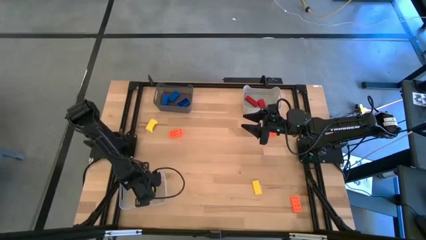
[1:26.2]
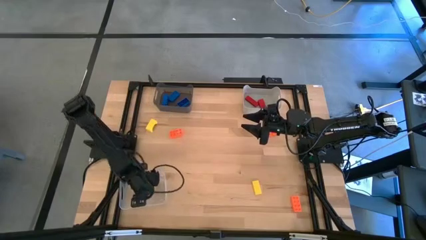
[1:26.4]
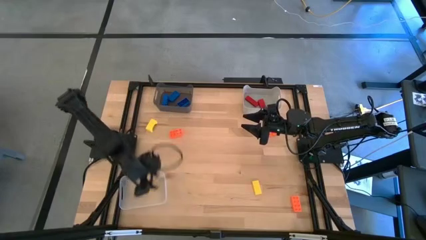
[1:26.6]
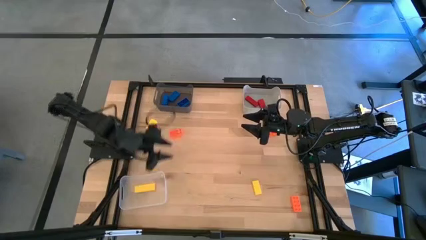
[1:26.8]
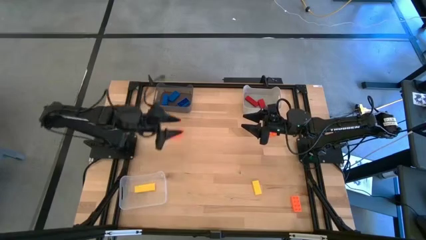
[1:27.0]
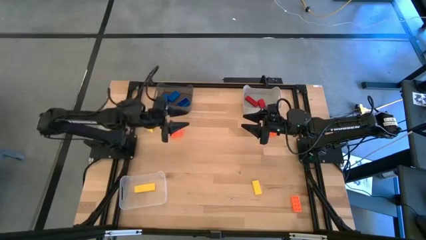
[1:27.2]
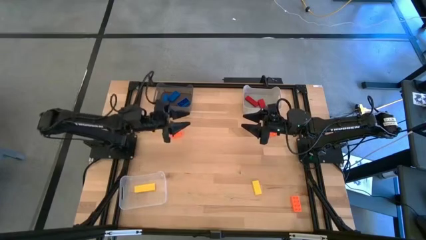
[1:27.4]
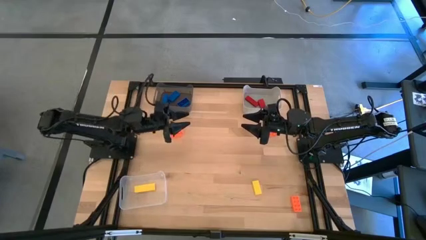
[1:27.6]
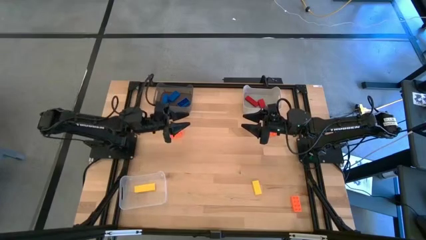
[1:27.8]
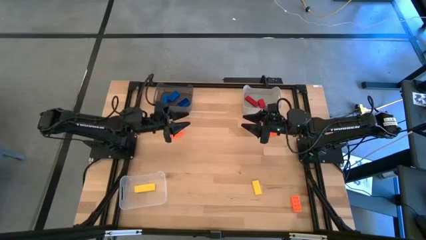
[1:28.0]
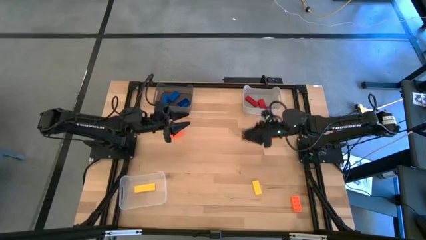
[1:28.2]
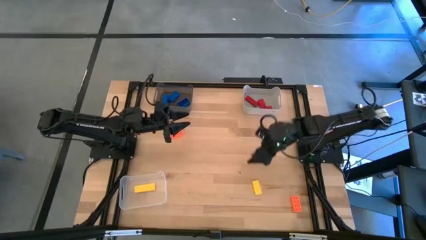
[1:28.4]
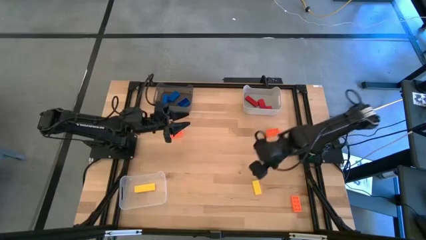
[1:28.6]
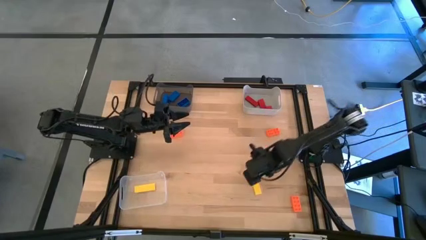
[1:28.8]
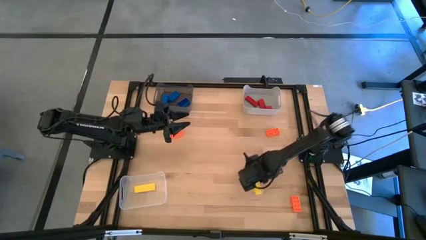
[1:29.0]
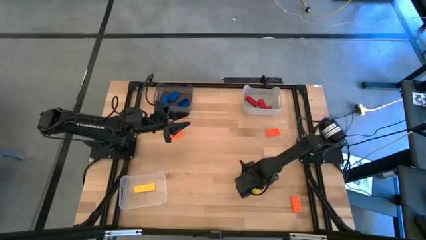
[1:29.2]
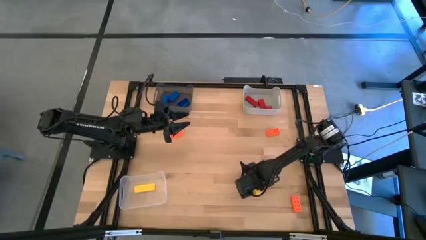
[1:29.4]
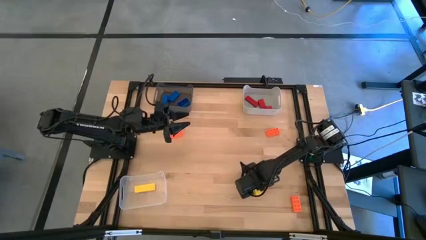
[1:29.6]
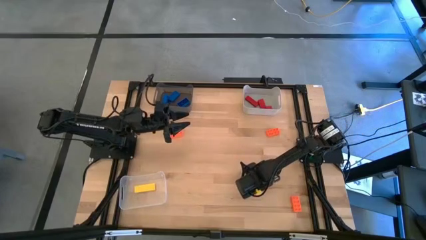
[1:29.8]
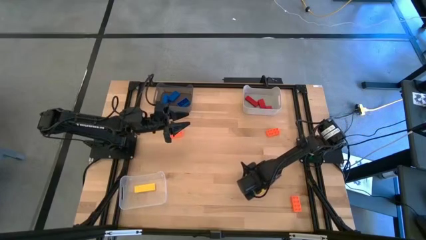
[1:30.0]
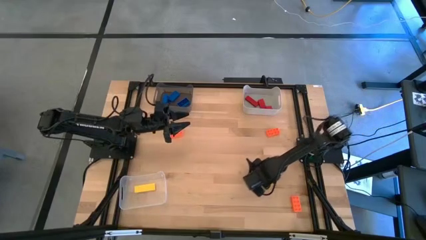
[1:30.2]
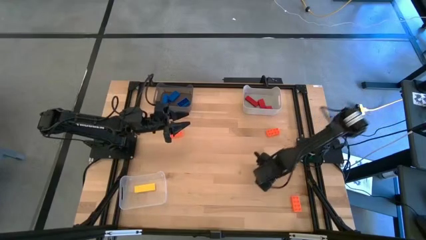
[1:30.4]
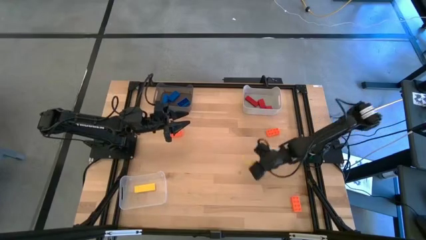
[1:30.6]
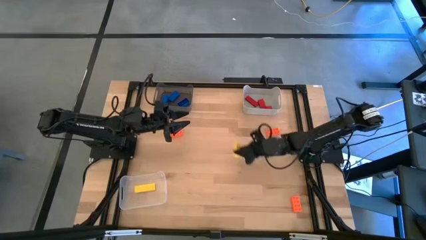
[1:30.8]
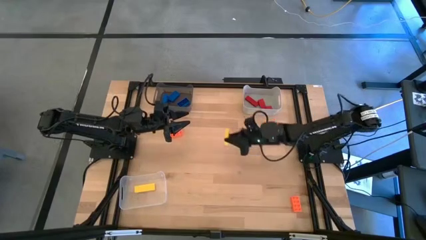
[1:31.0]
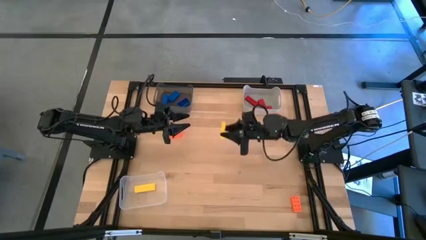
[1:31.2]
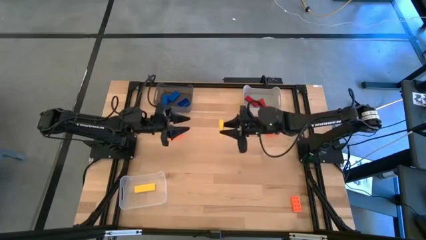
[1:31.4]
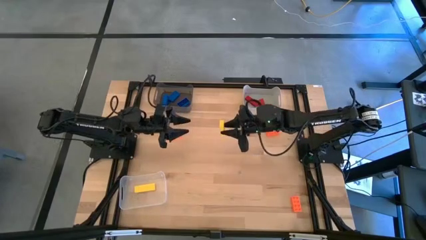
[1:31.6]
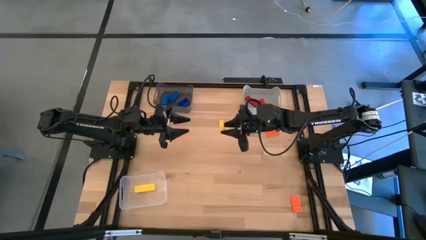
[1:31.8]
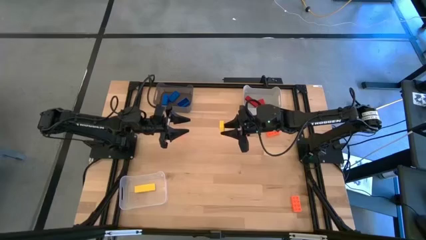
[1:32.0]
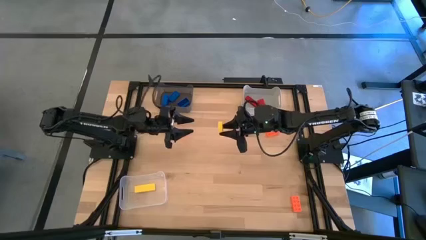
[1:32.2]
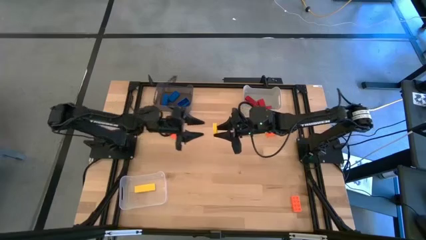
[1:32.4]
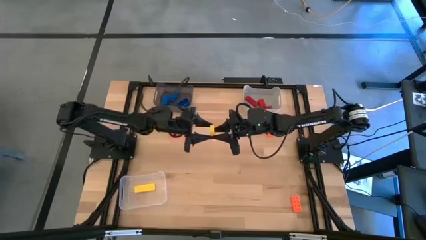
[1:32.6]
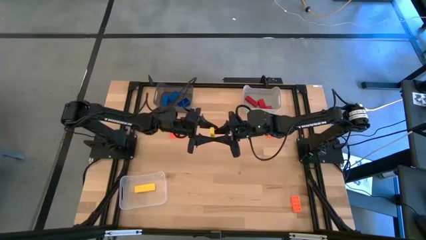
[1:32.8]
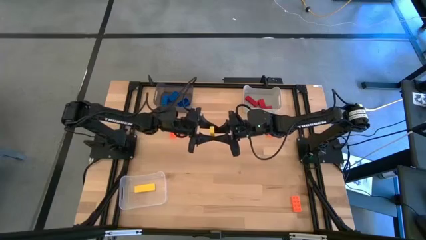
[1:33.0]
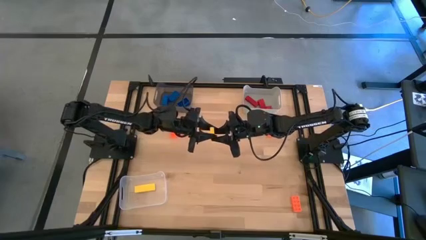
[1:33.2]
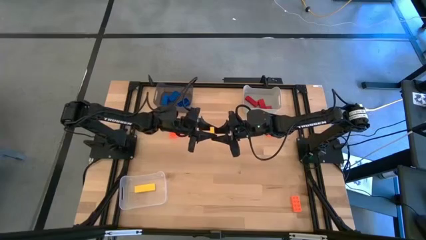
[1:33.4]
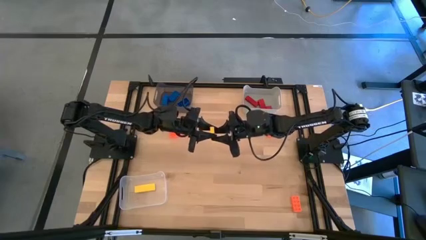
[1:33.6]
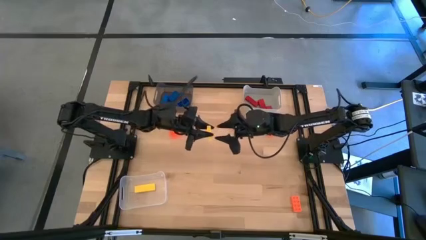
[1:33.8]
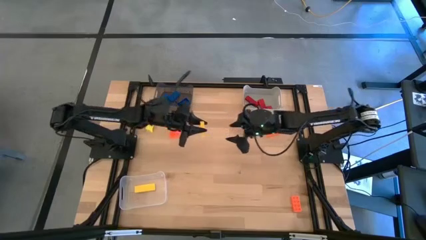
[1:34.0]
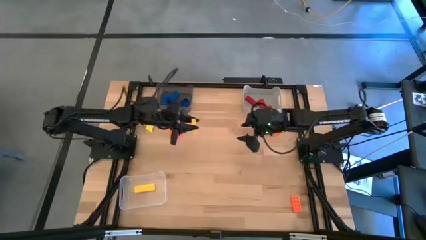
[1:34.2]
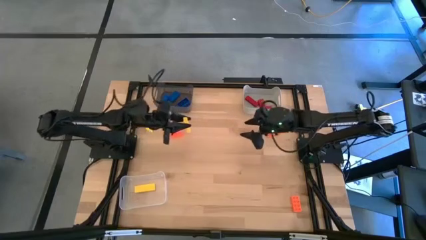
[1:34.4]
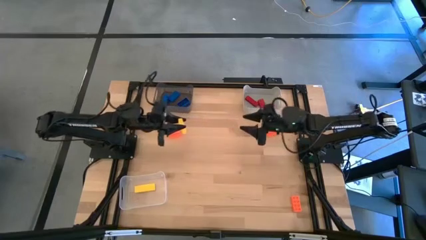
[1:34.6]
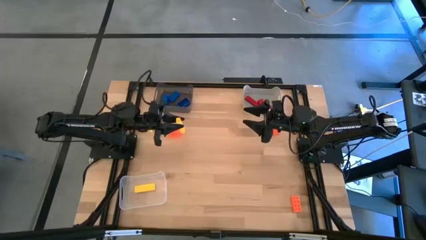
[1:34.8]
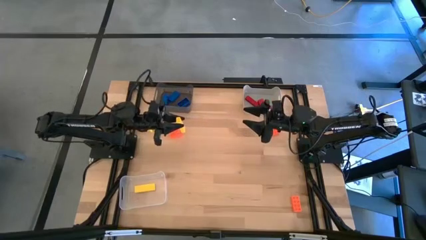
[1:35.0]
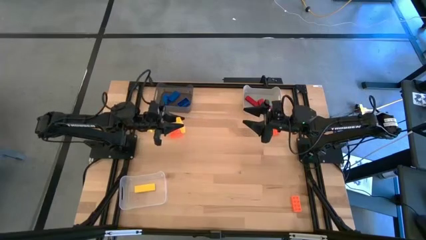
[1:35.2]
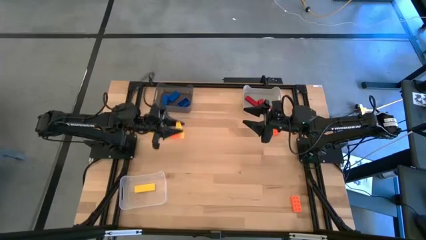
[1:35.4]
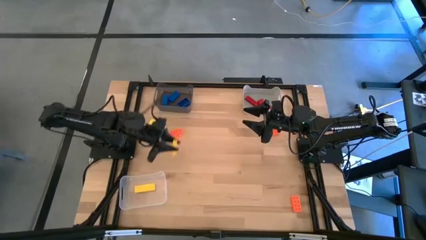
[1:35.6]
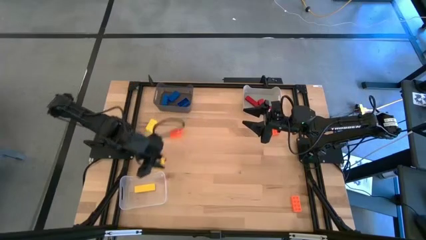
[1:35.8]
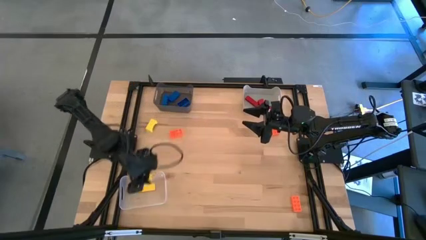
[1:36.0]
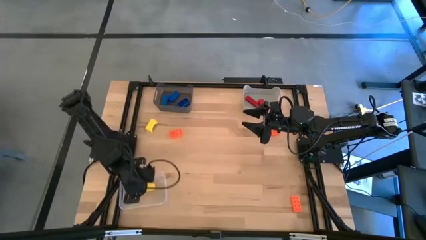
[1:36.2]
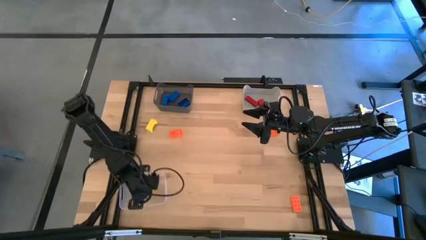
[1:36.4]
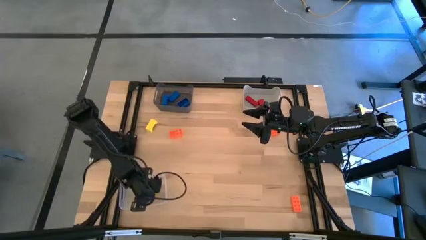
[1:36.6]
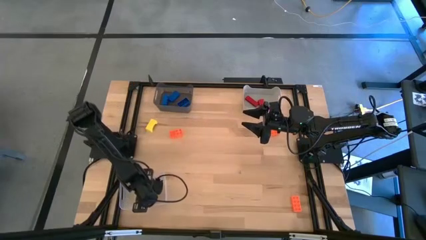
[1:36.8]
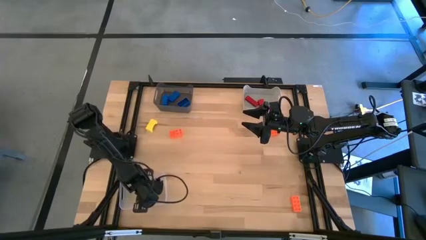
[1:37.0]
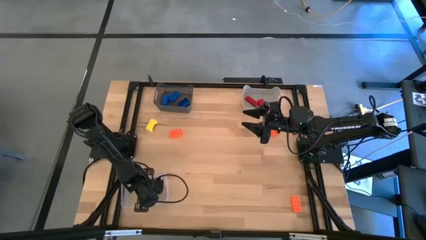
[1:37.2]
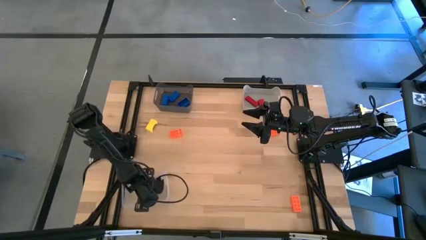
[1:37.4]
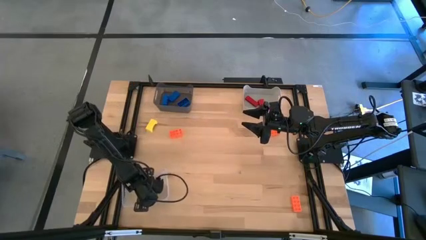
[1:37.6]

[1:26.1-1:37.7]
Task: Sort & place blocks by color
Put the yellow square block into the white transparent bin

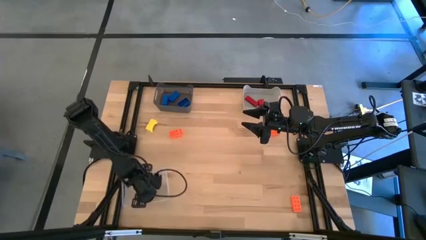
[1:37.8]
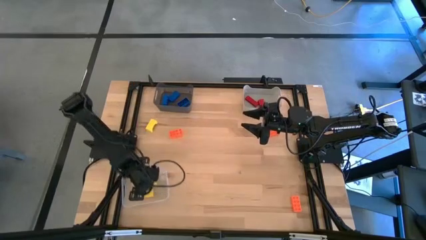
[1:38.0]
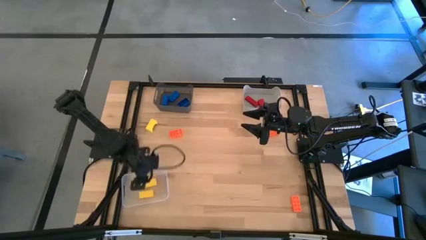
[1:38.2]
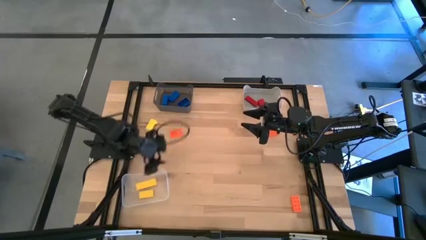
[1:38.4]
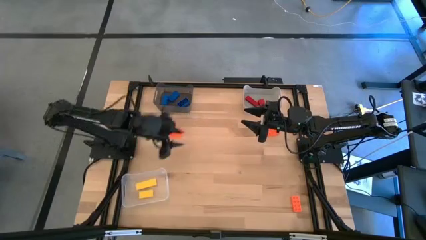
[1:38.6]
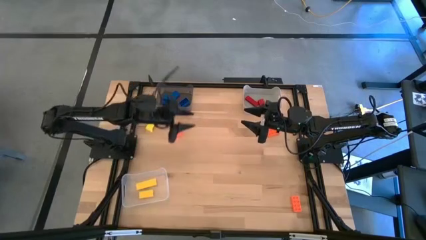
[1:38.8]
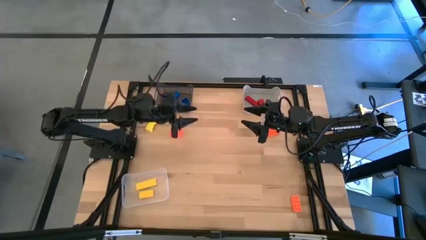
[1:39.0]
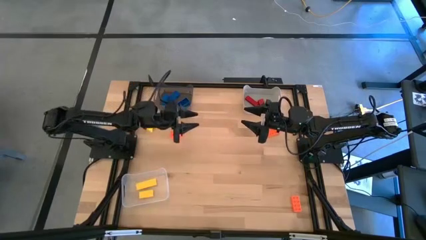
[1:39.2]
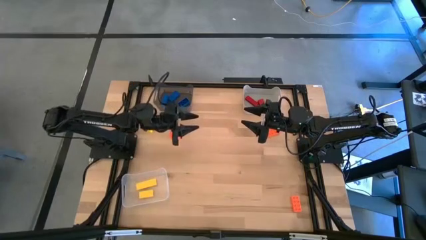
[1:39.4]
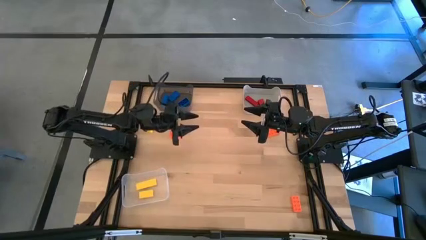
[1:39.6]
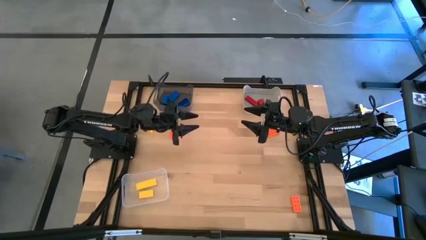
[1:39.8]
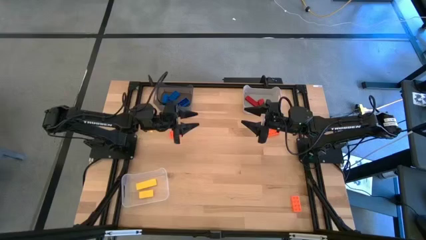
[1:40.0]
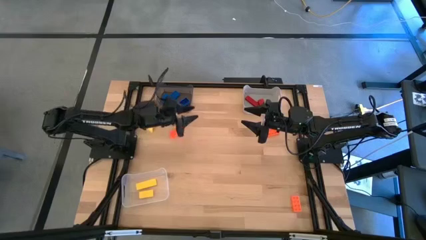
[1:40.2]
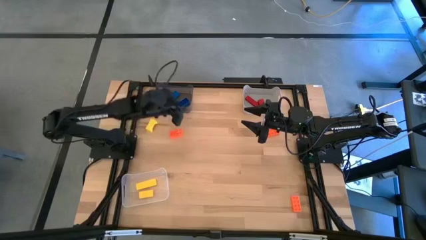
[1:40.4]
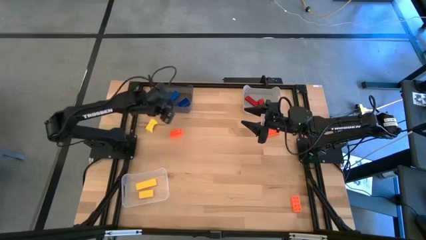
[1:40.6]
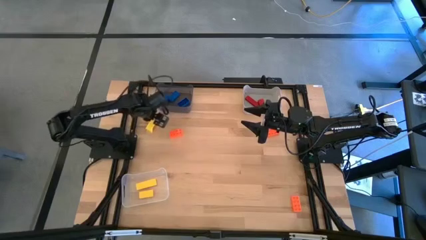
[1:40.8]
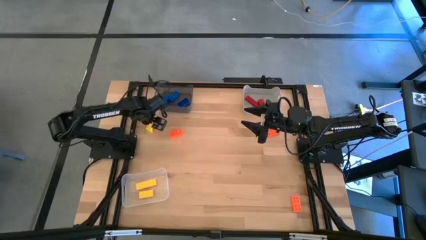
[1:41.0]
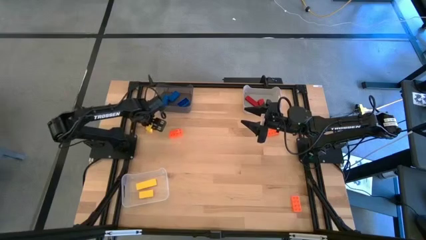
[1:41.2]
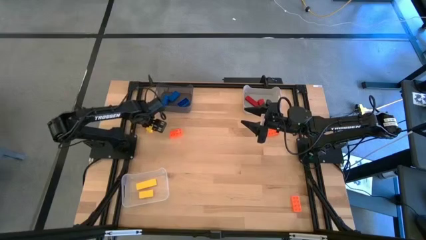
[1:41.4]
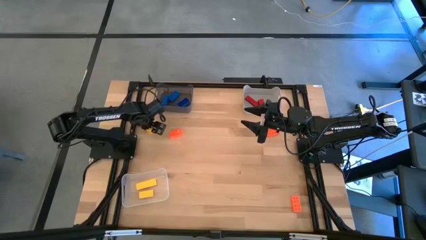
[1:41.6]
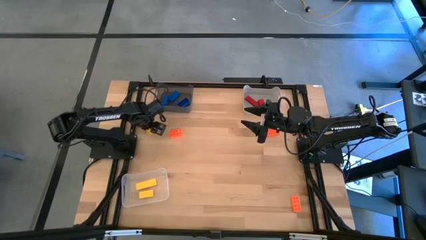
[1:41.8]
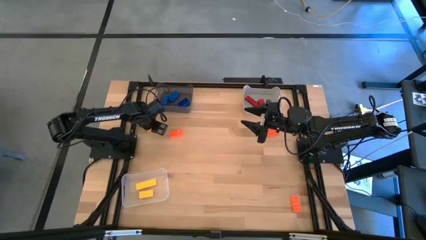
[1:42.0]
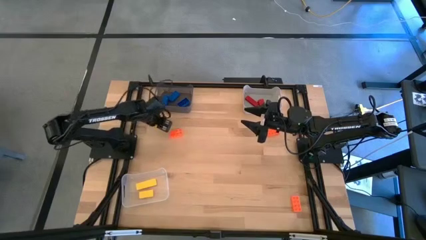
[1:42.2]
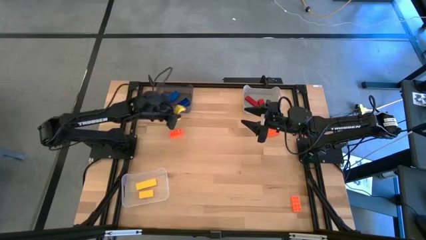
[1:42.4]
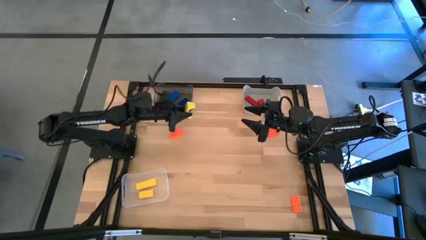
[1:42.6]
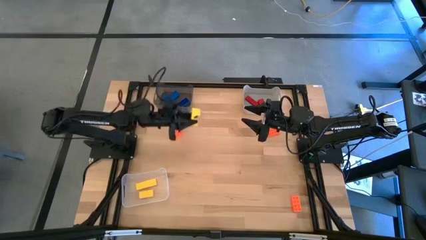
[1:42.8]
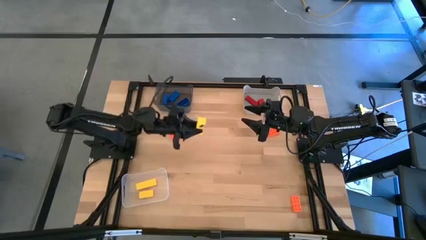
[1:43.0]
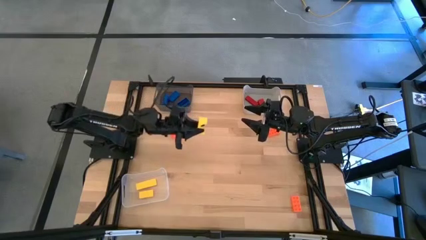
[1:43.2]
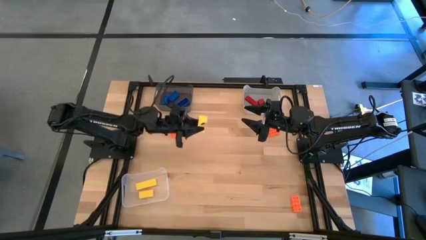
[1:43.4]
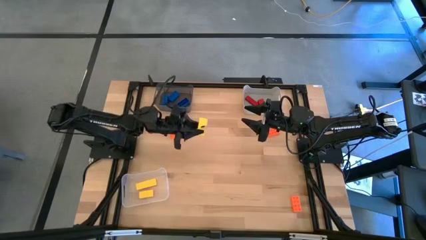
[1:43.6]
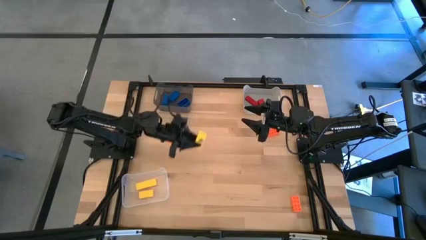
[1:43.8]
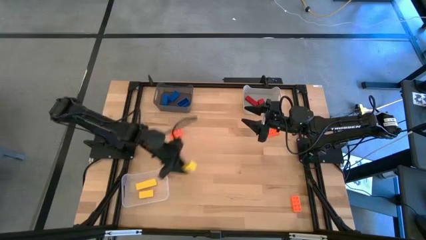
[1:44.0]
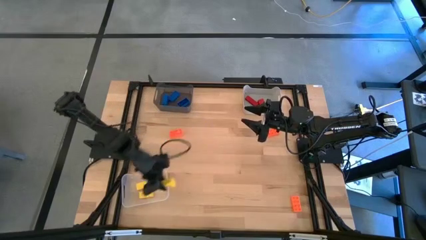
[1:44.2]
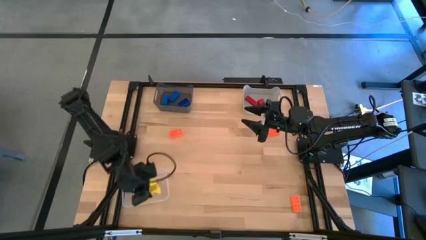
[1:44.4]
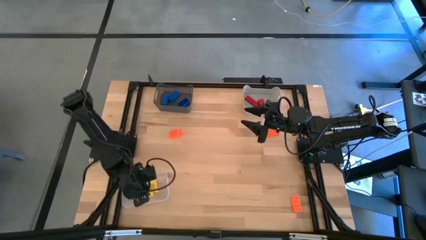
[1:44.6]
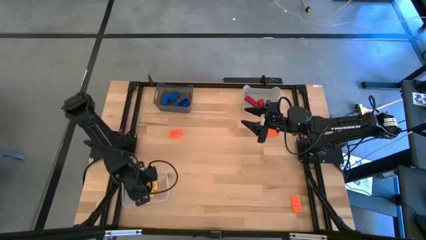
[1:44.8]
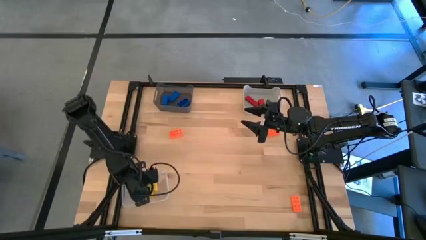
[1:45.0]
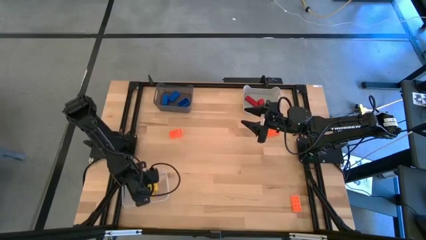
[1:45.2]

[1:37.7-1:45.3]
Put the yellow arch block into the white transparent bin
